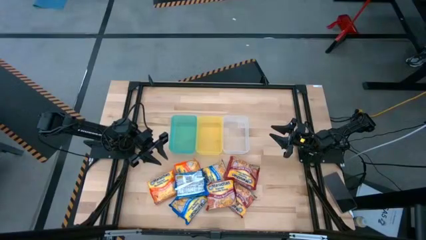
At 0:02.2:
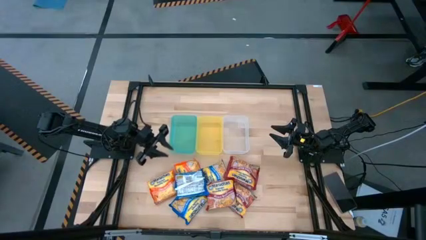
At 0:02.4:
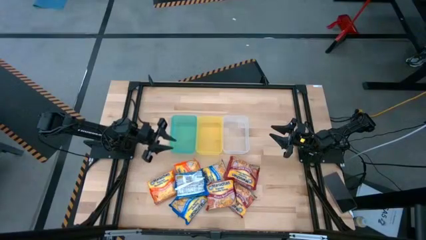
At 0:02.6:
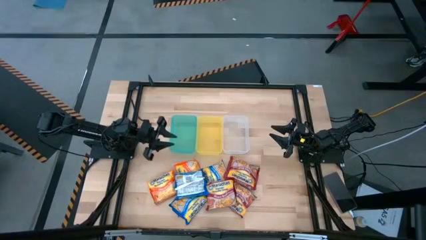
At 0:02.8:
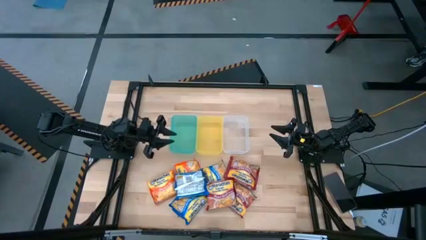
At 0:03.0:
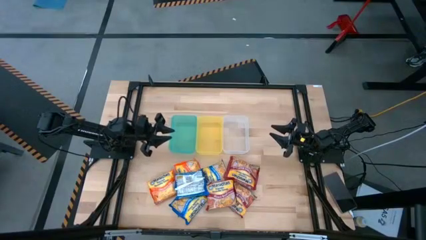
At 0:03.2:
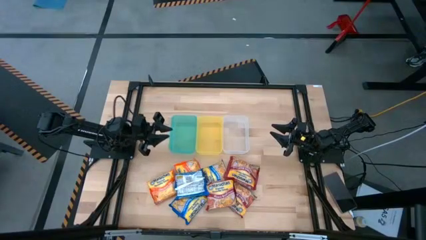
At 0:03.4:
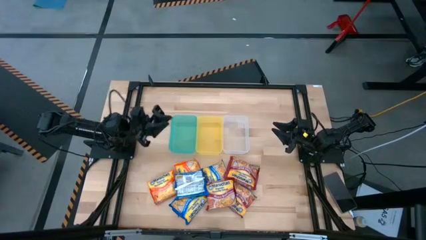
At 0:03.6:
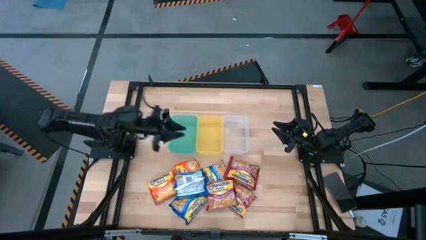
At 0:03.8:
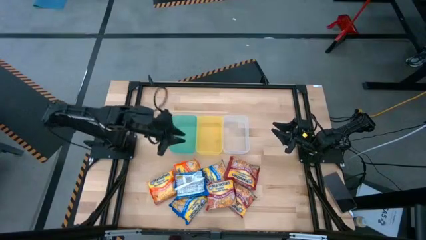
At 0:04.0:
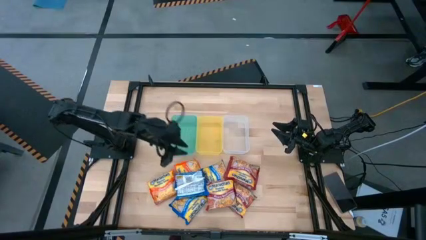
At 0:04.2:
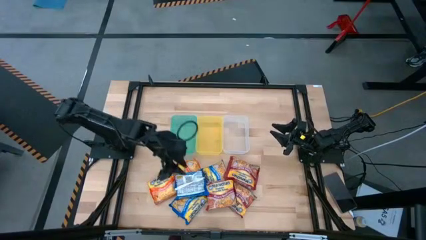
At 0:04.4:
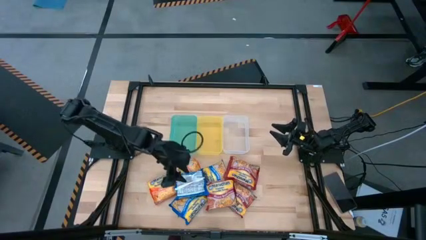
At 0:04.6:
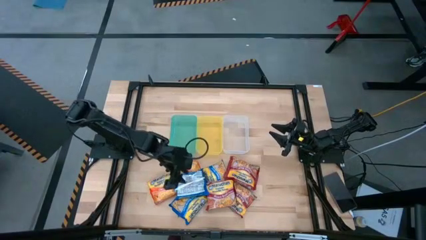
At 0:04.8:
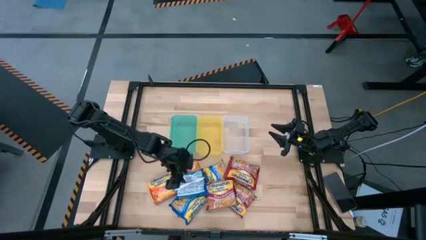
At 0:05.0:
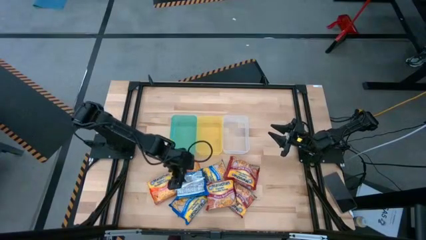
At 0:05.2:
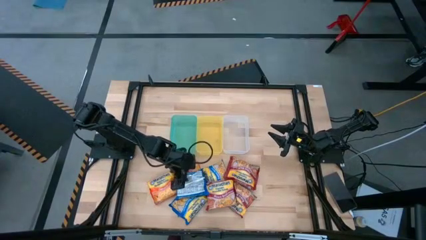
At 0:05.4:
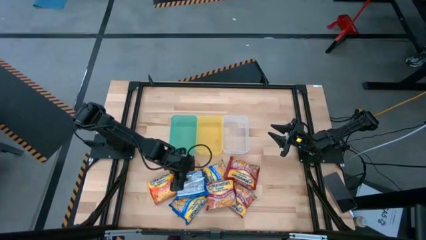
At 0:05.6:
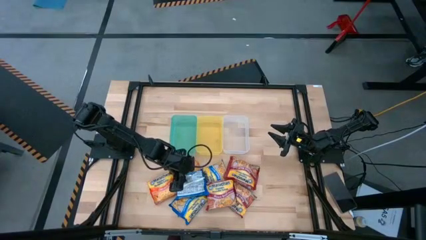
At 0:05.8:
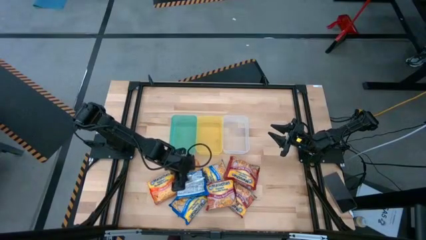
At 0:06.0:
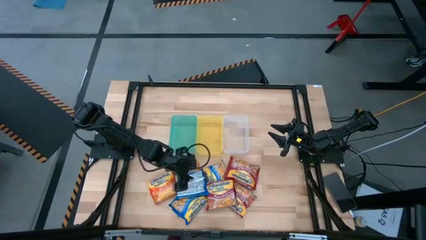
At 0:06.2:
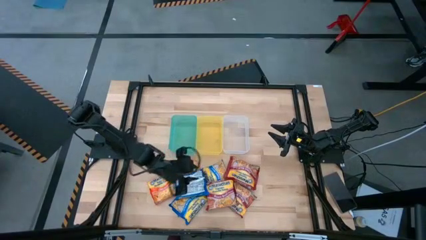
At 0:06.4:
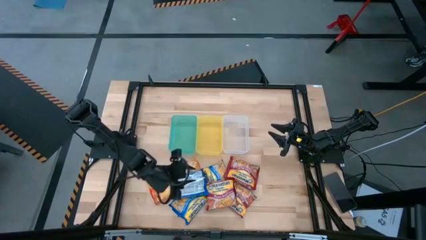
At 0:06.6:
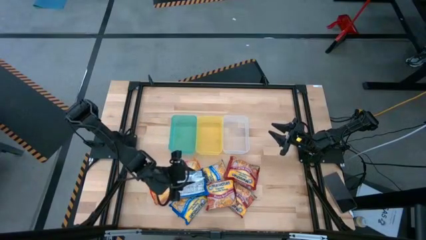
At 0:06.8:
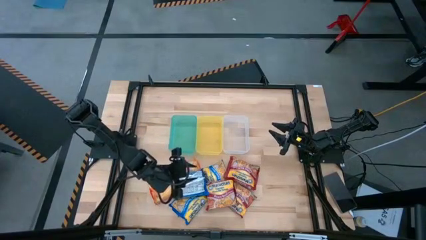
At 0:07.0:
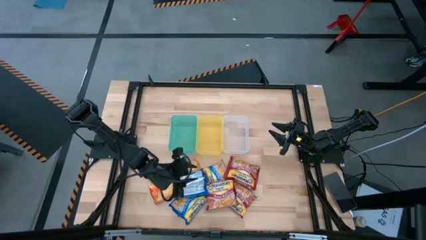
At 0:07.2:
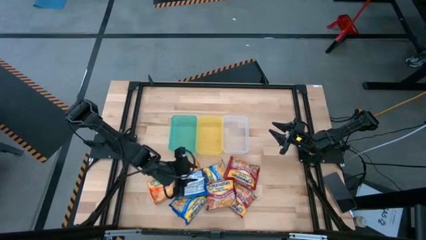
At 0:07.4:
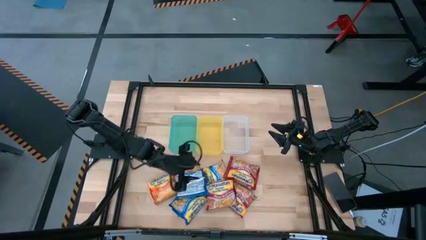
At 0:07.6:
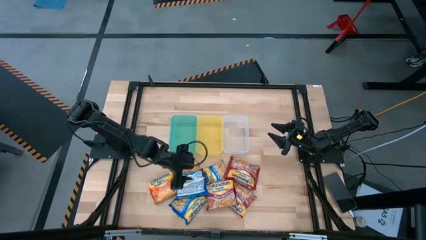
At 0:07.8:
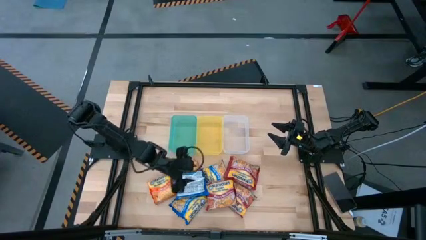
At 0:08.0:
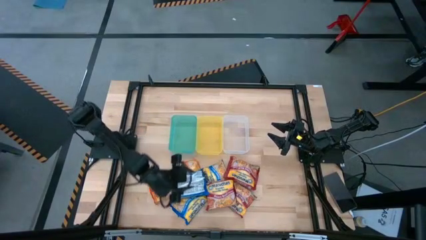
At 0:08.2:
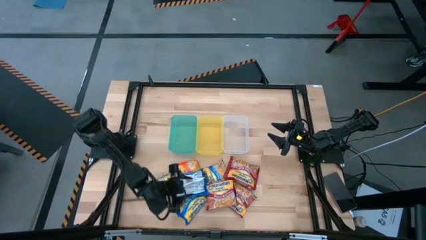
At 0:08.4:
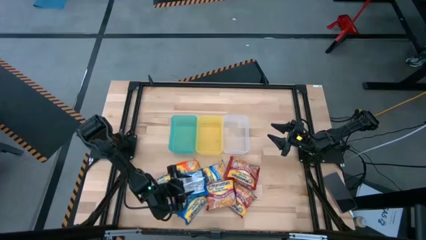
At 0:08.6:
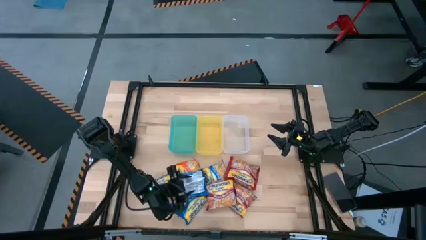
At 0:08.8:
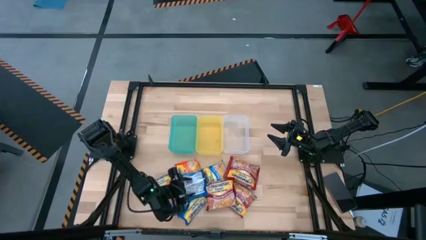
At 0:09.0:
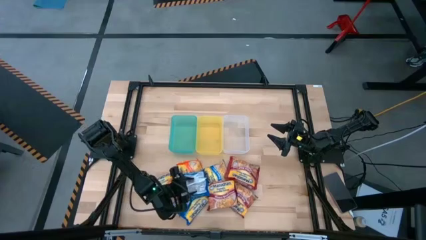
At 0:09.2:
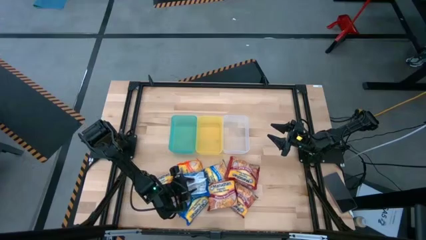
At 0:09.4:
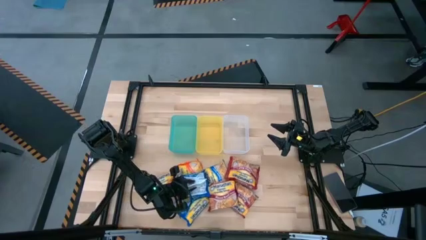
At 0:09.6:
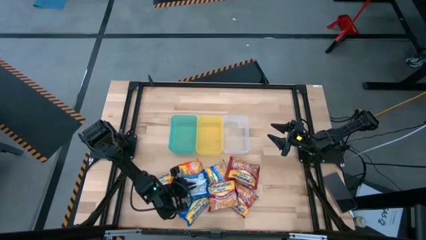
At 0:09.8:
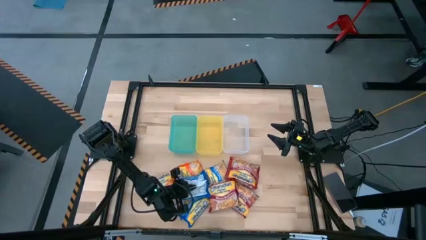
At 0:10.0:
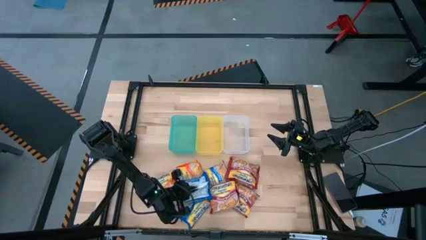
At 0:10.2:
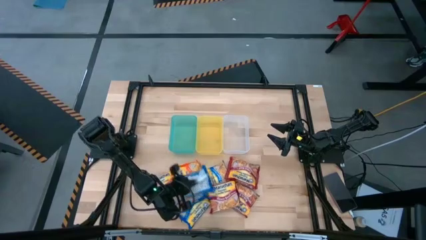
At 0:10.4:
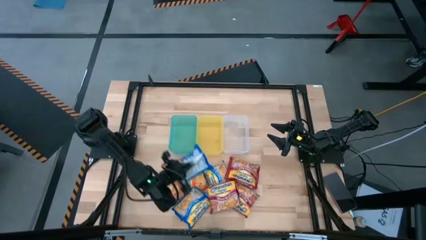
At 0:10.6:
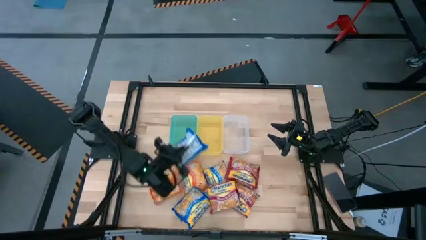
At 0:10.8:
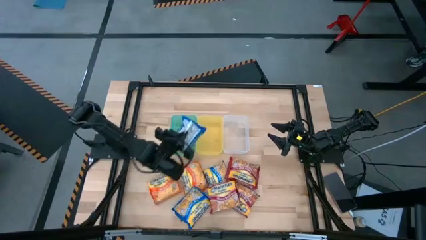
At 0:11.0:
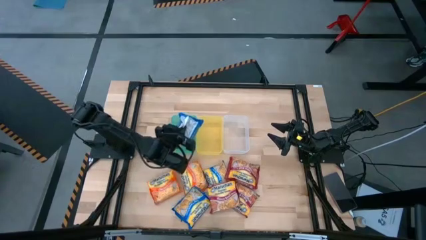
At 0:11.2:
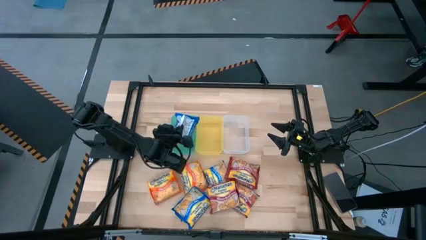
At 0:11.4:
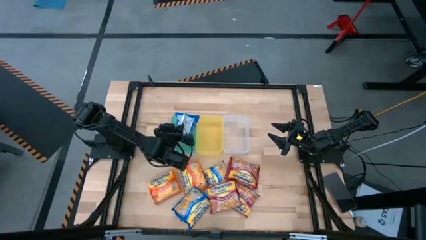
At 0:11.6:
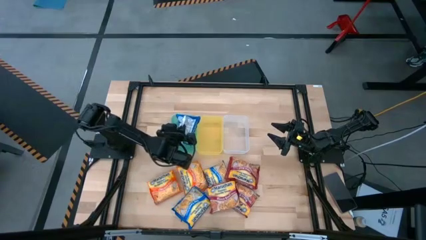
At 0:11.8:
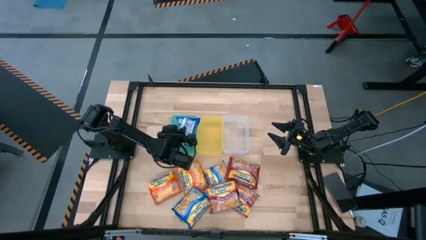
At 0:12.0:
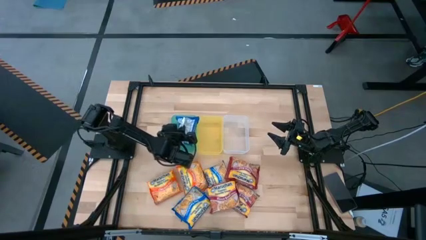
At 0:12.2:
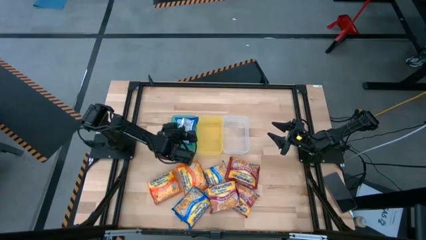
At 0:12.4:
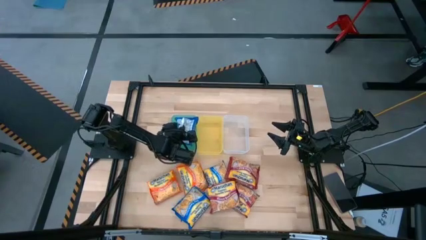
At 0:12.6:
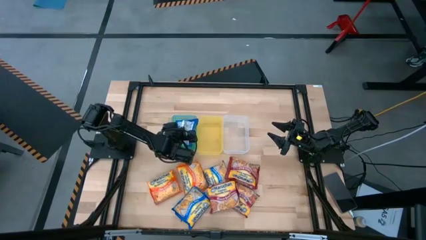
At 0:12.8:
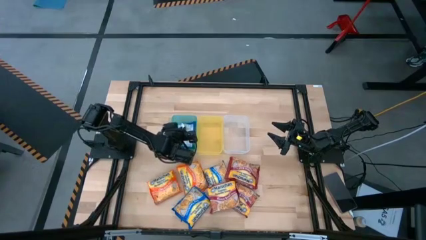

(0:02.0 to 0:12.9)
Task: Sort Maruchan noodles
Put the blue bag into the green bin
